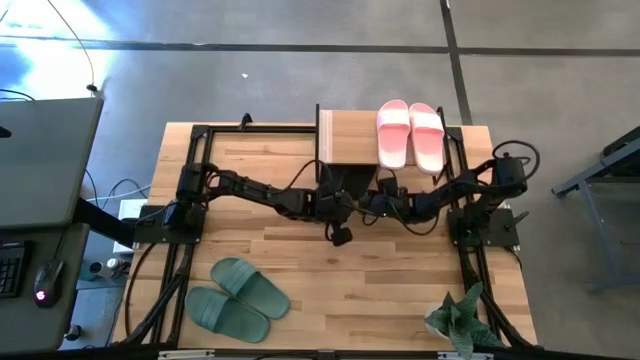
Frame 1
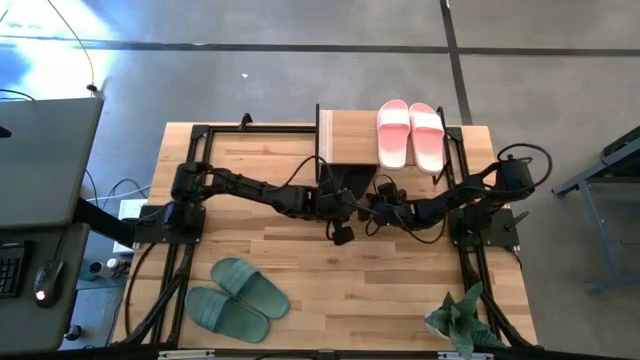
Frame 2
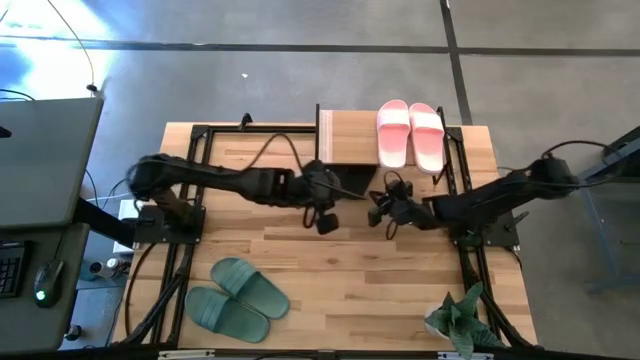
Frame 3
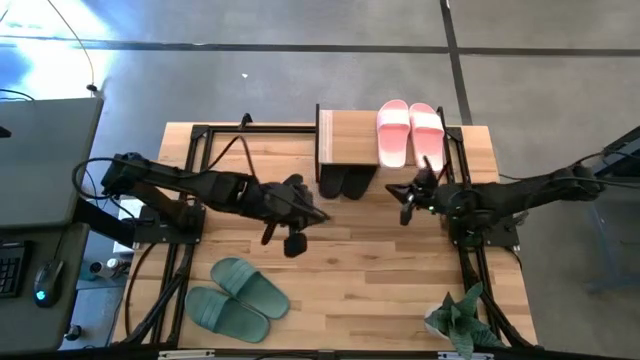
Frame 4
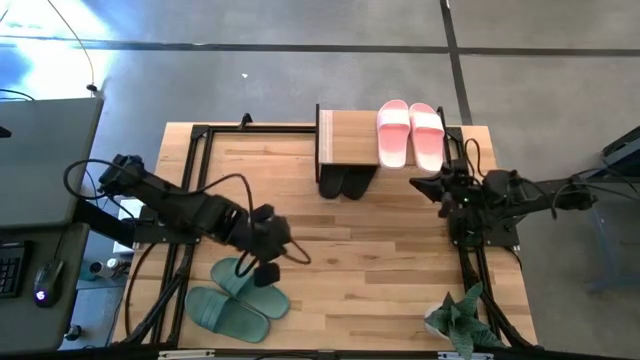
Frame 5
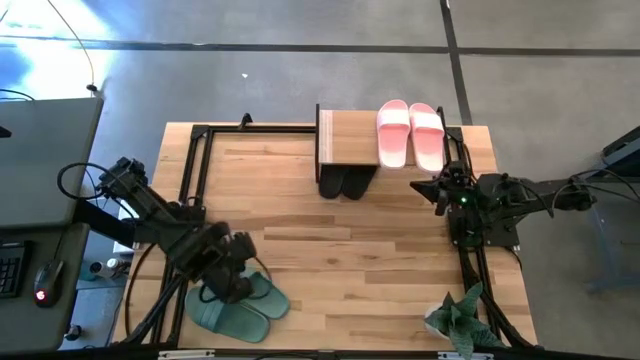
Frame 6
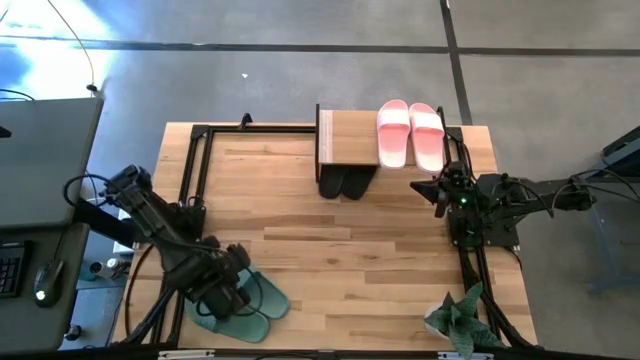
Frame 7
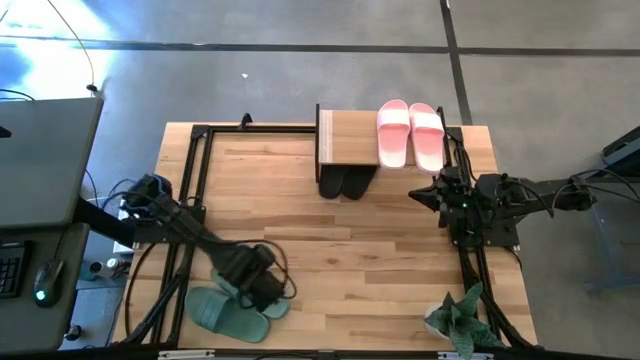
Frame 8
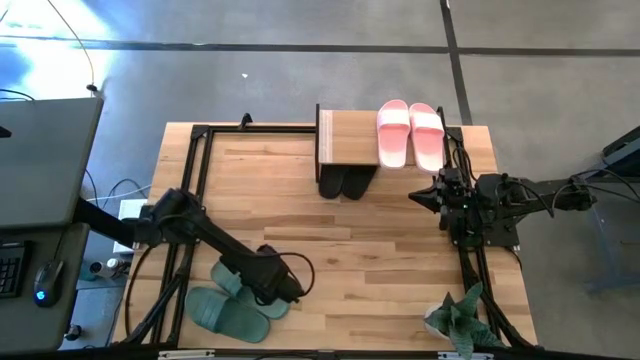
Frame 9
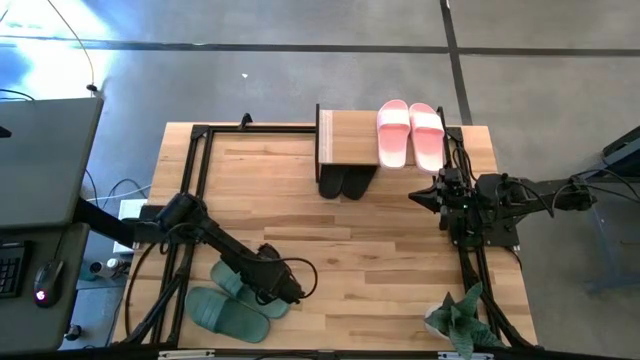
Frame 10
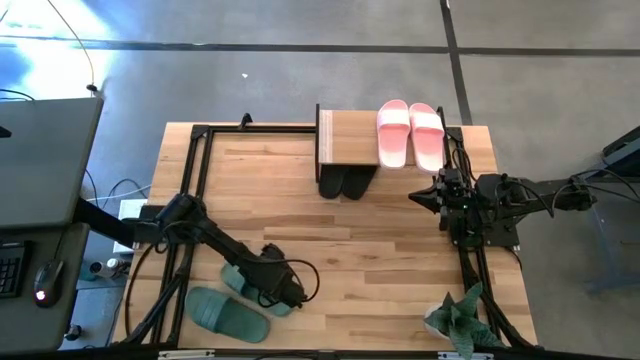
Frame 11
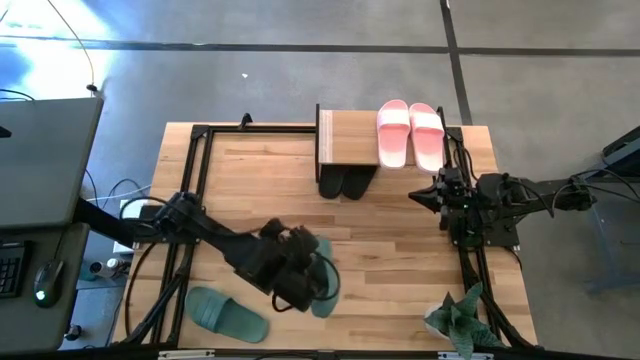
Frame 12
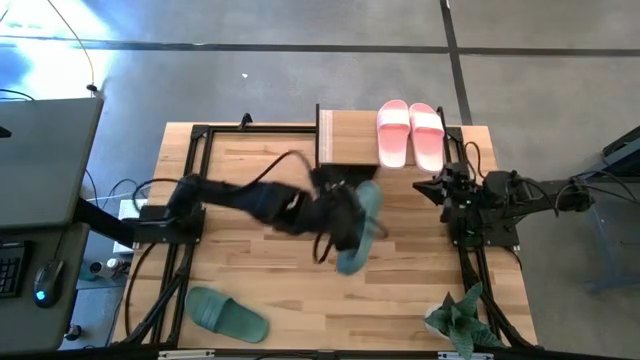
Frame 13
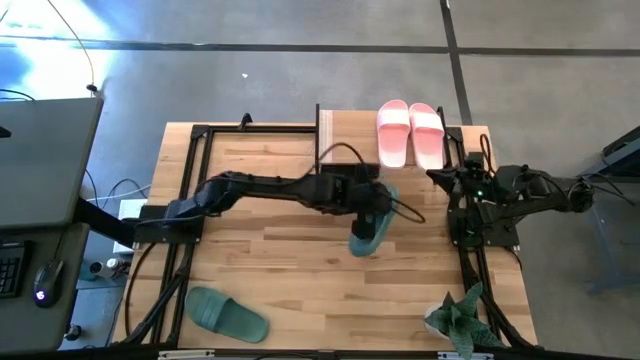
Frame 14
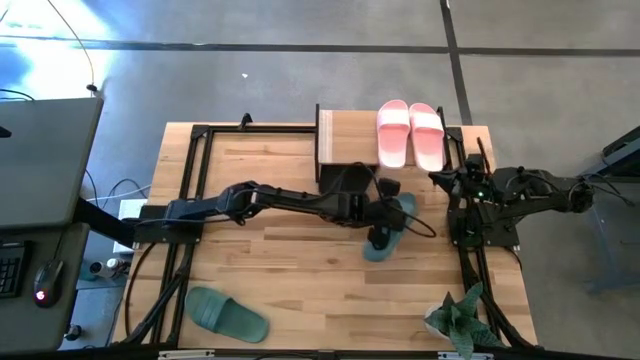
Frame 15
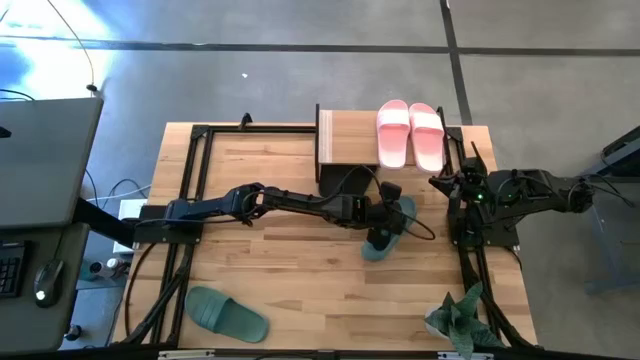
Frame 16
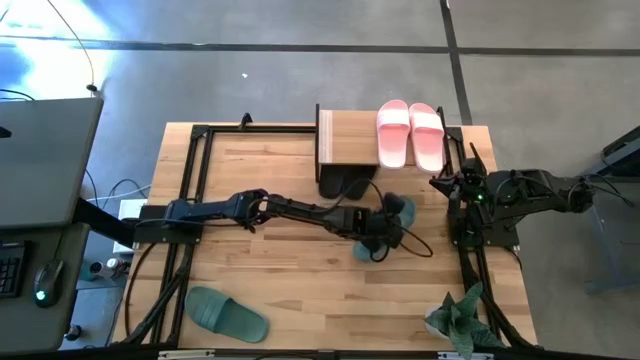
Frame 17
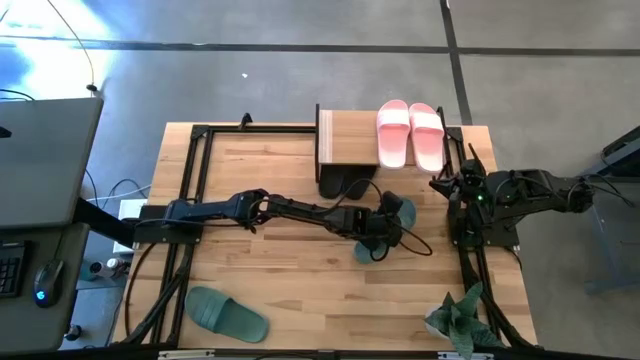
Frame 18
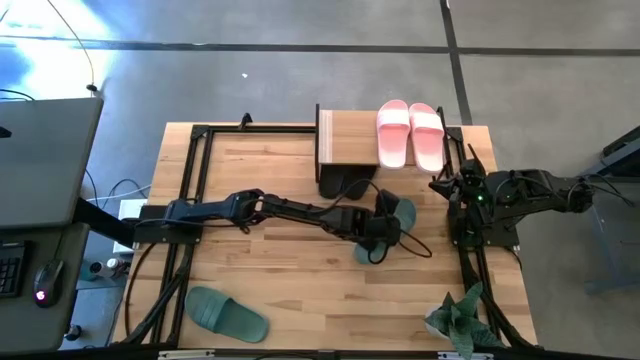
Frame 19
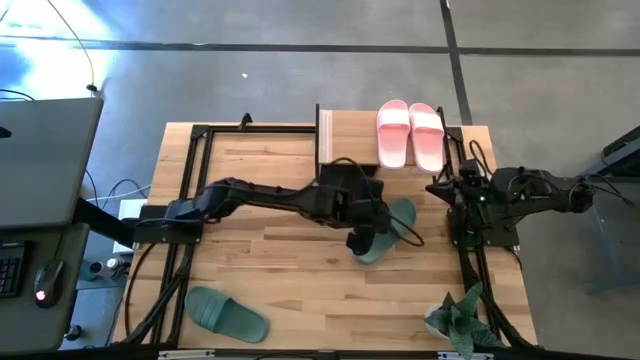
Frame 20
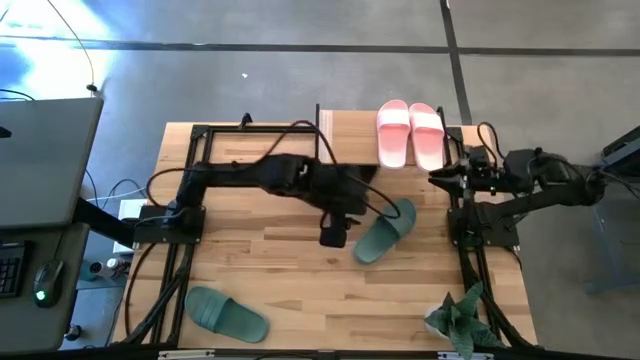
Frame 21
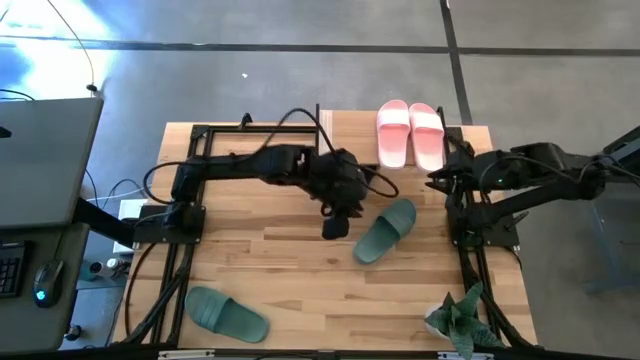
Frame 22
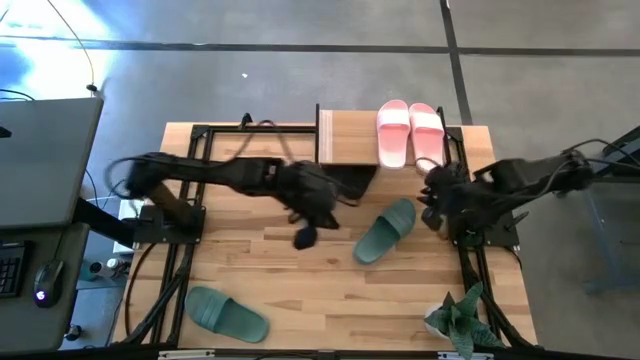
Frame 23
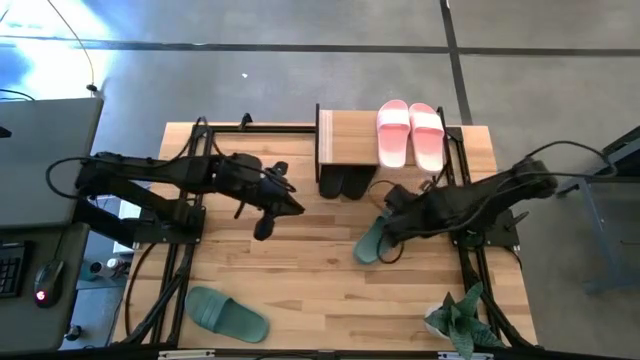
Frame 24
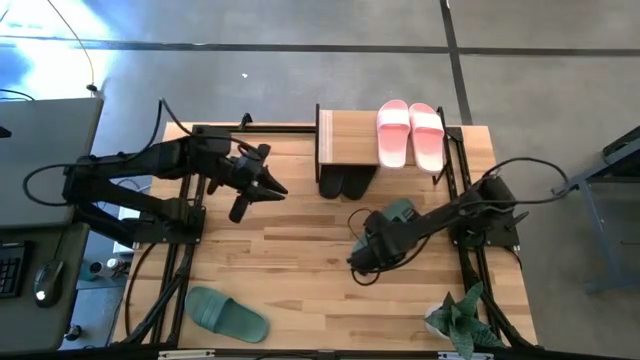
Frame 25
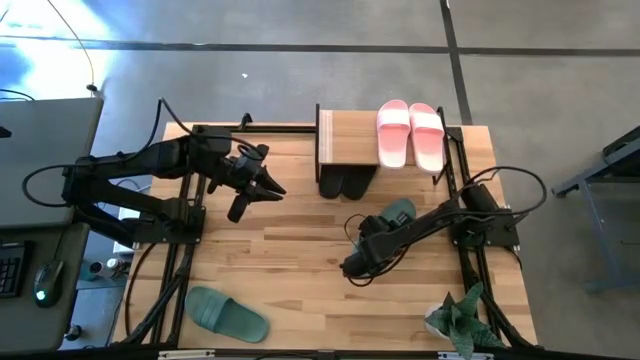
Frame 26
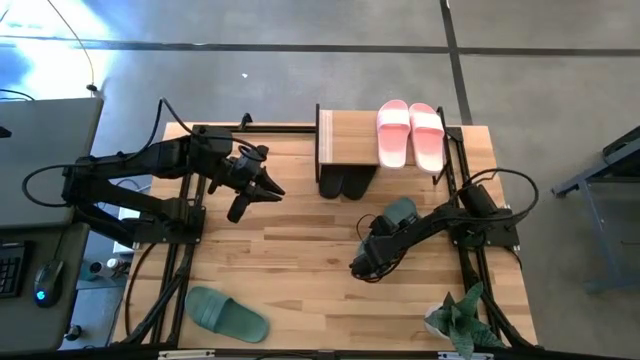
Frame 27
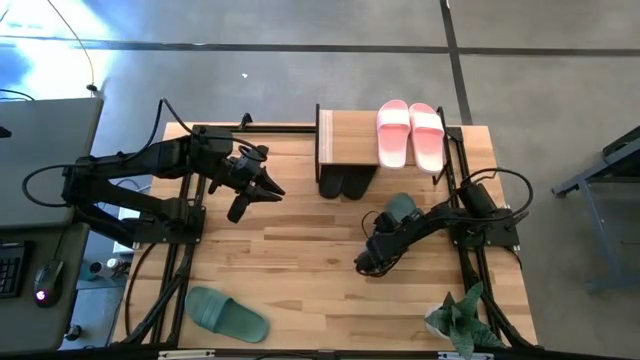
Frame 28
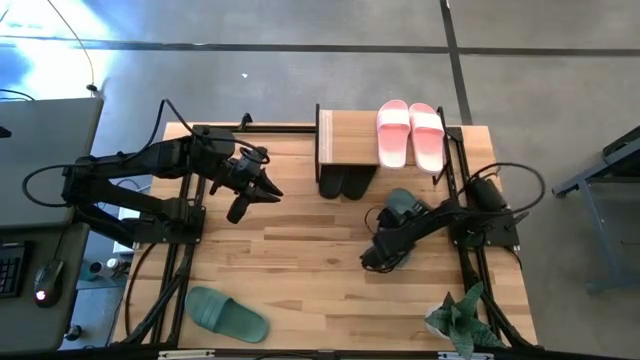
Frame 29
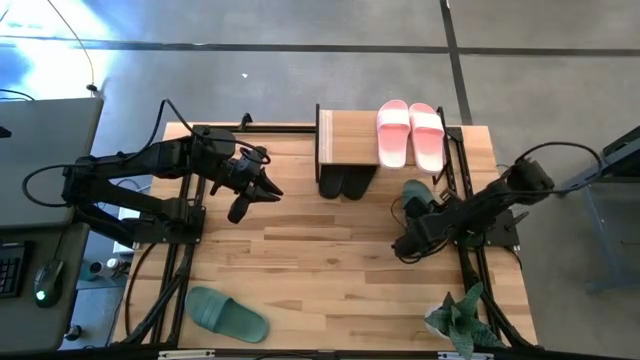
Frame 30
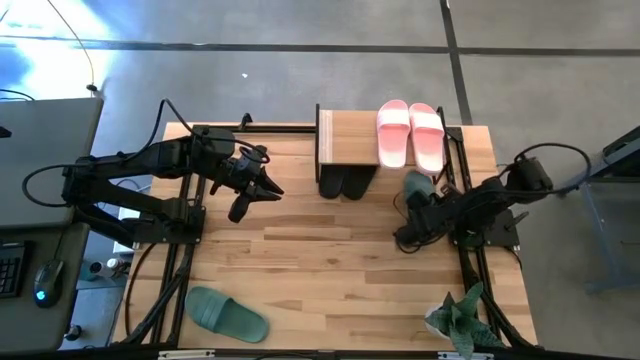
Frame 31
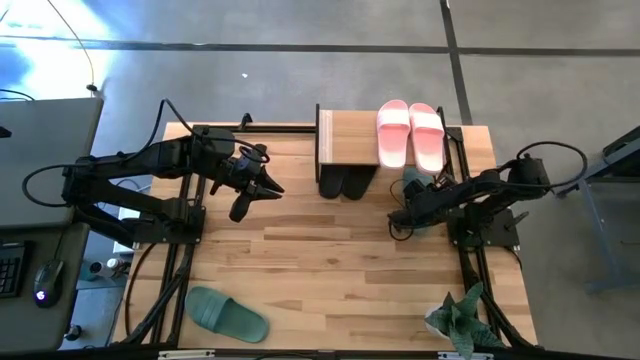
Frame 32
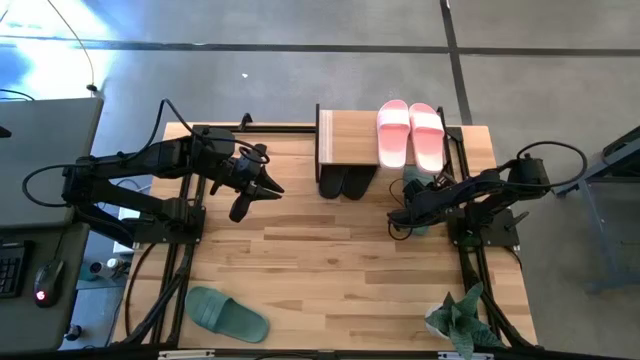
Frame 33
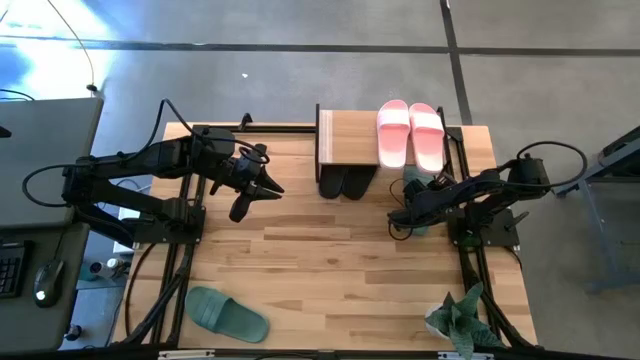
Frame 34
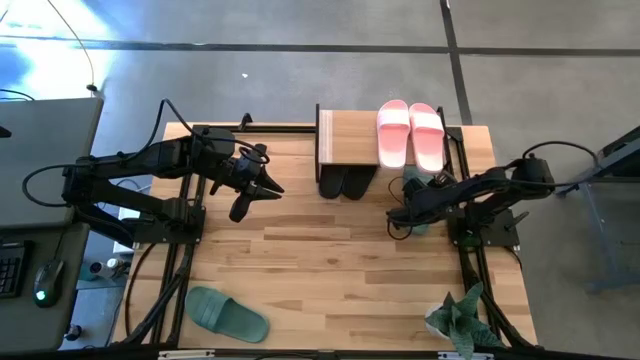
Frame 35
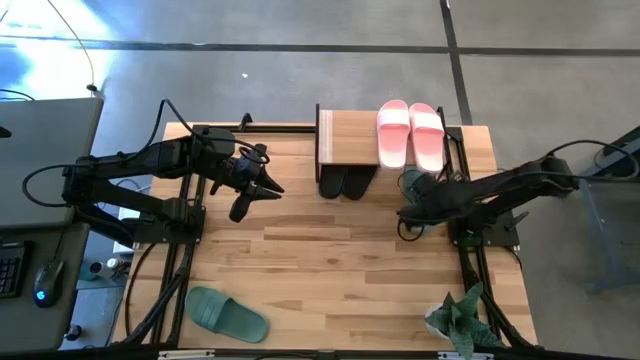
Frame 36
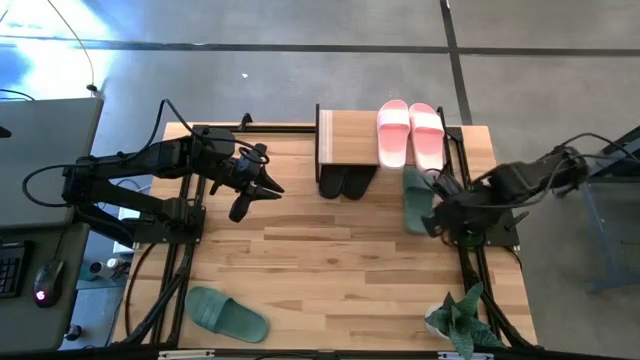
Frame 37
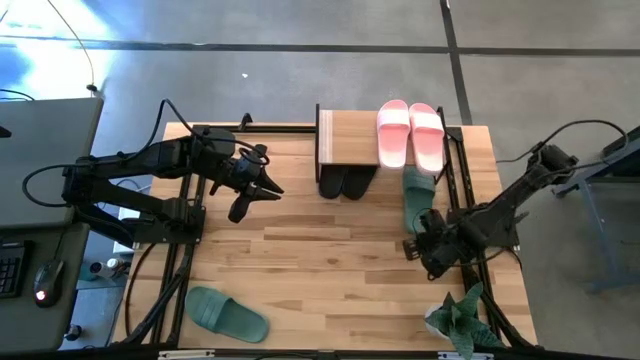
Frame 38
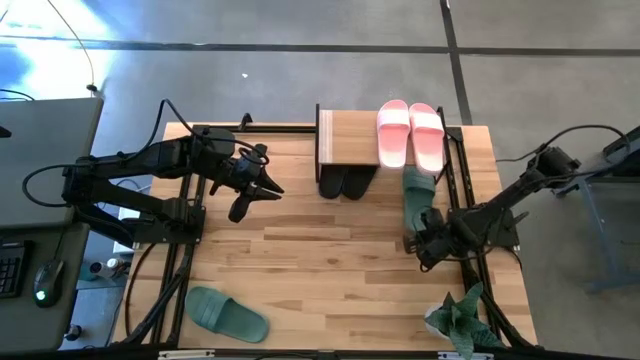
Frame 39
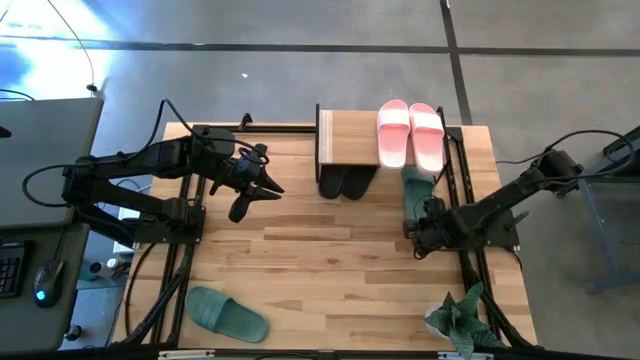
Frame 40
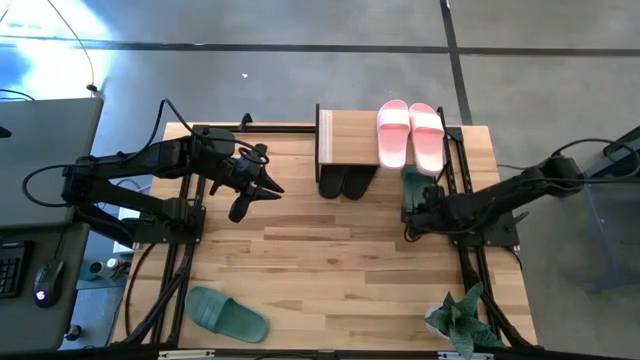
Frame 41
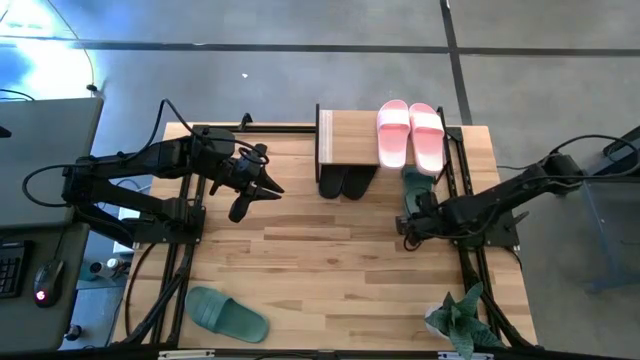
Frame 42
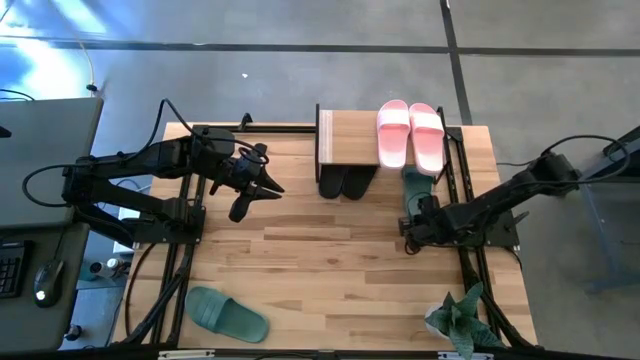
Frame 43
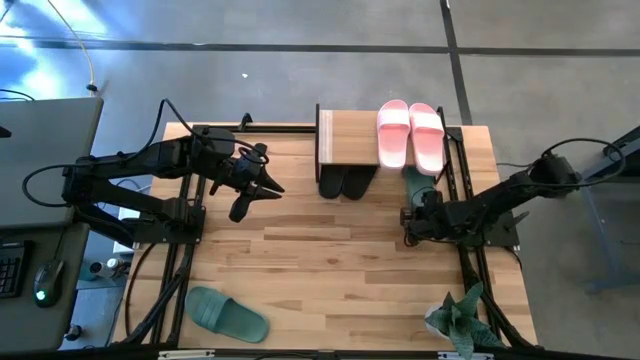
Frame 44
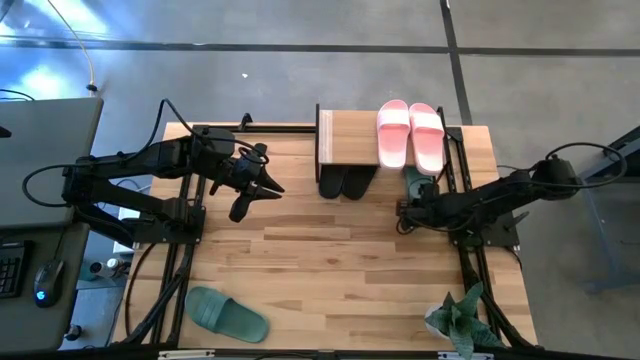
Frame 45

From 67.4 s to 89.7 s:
Task: Pick and place slides into the shelf
Put the top green slide under the shelf
